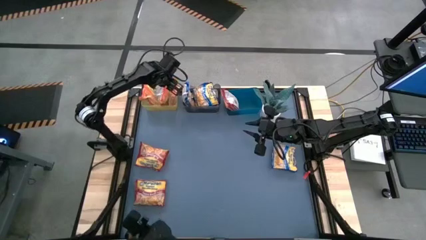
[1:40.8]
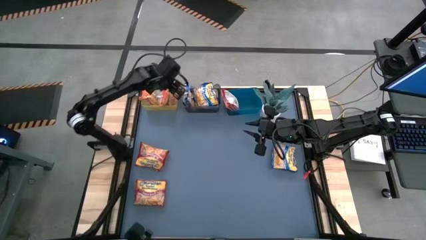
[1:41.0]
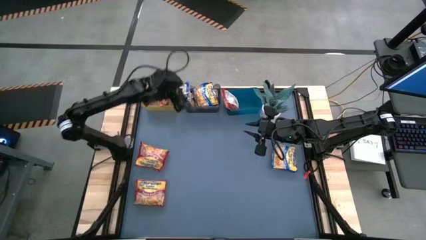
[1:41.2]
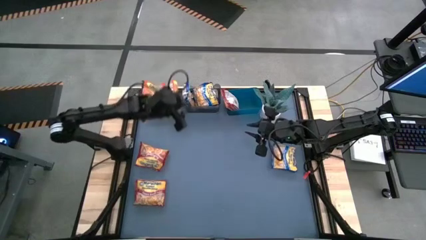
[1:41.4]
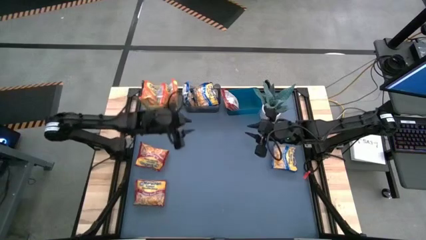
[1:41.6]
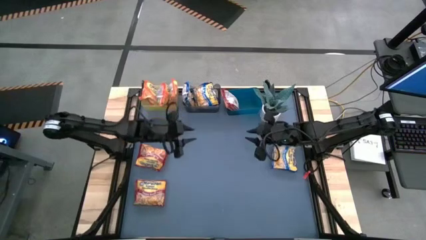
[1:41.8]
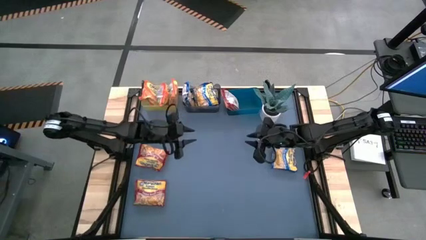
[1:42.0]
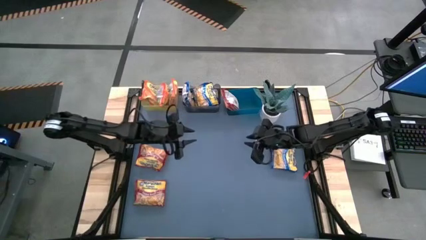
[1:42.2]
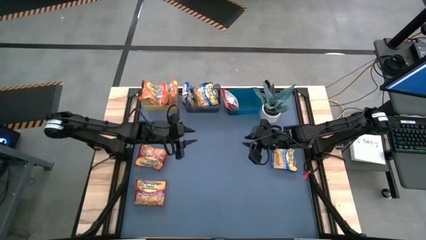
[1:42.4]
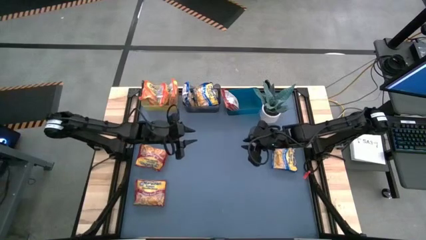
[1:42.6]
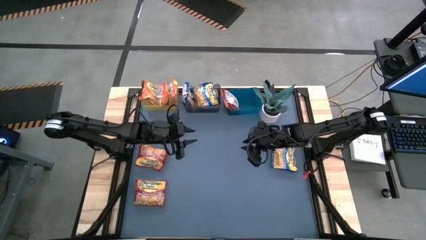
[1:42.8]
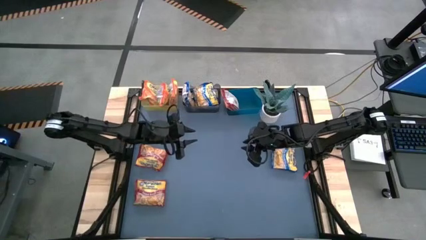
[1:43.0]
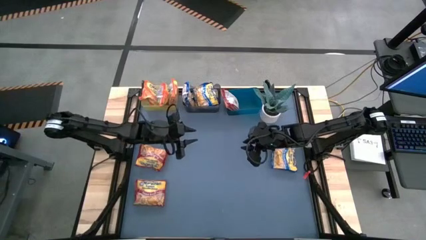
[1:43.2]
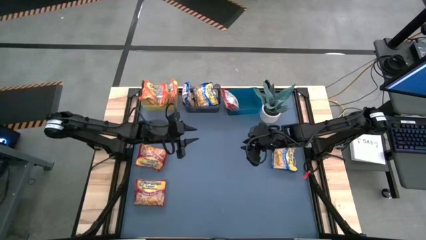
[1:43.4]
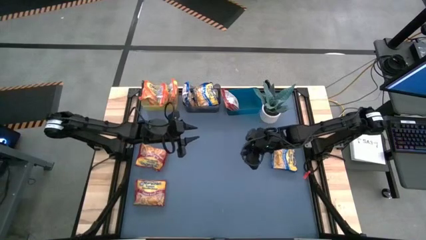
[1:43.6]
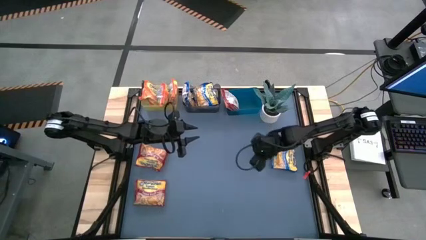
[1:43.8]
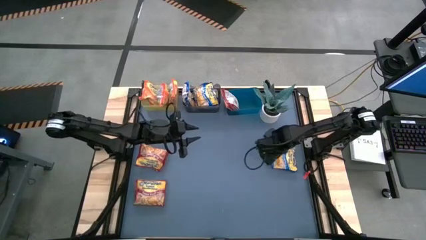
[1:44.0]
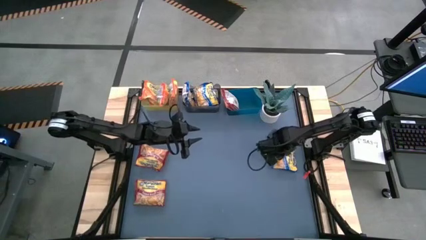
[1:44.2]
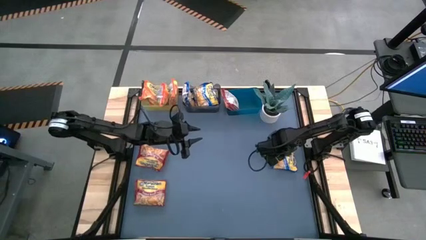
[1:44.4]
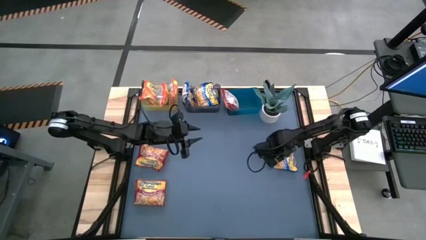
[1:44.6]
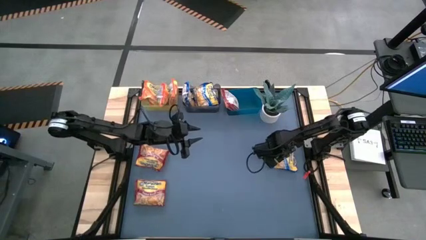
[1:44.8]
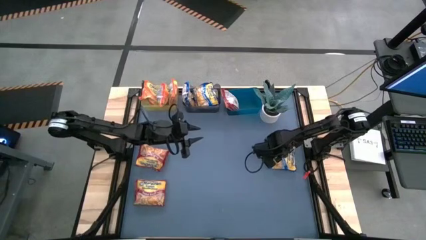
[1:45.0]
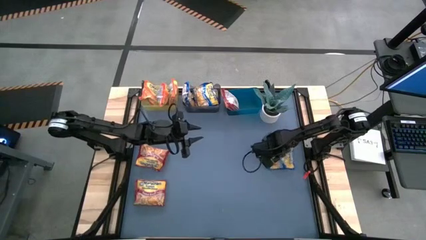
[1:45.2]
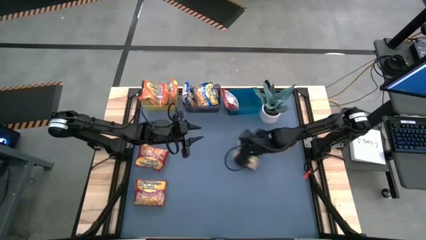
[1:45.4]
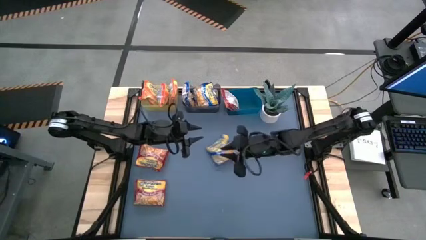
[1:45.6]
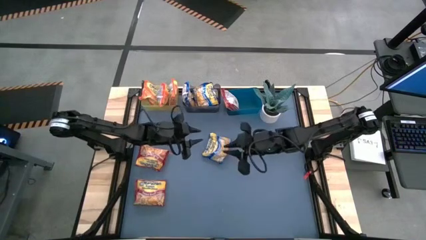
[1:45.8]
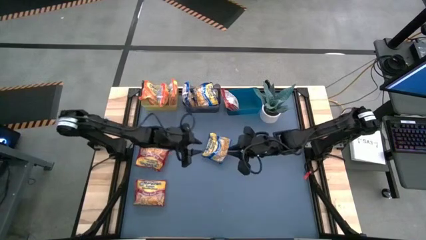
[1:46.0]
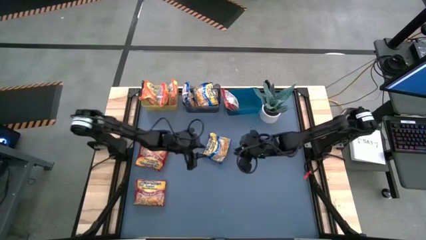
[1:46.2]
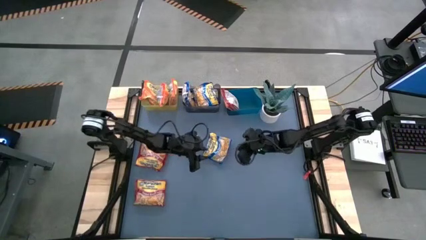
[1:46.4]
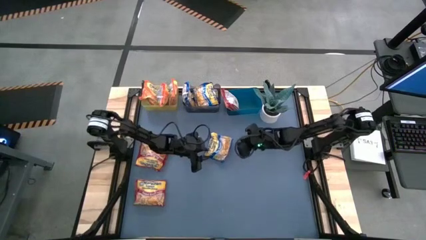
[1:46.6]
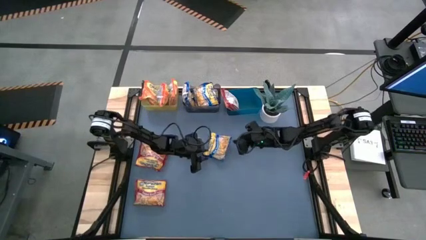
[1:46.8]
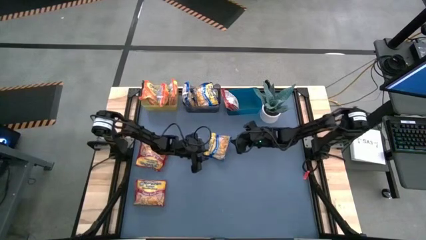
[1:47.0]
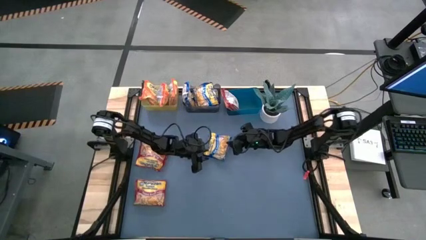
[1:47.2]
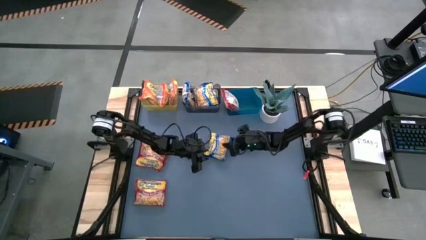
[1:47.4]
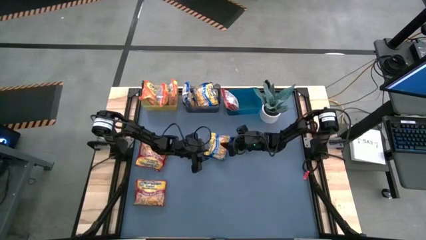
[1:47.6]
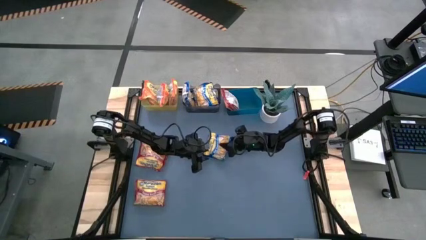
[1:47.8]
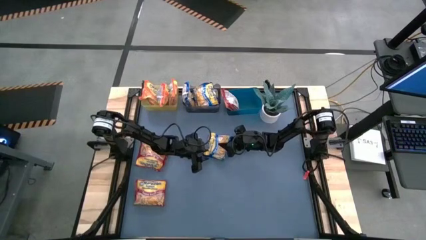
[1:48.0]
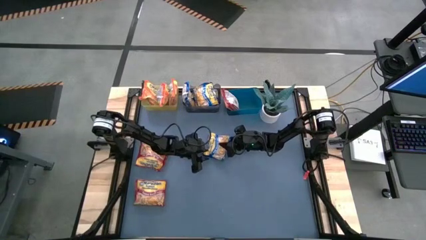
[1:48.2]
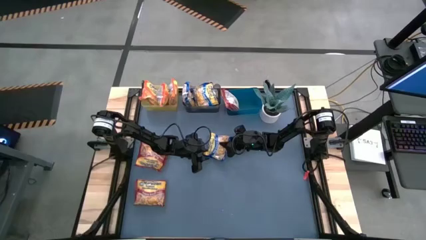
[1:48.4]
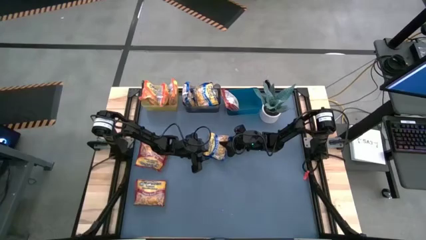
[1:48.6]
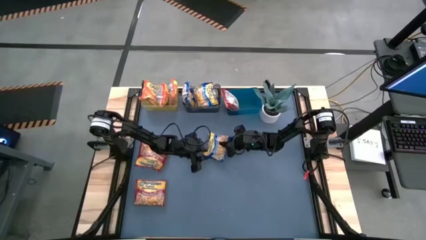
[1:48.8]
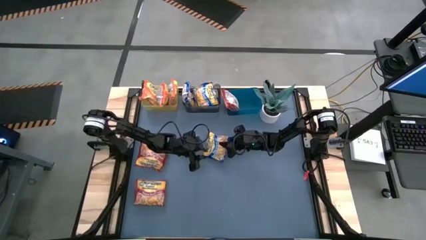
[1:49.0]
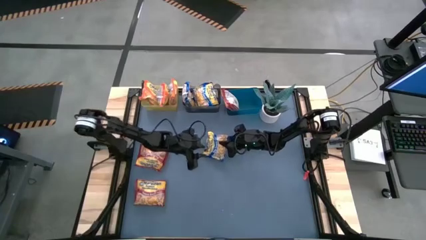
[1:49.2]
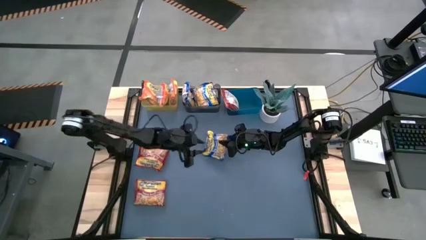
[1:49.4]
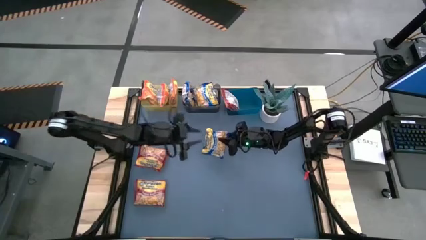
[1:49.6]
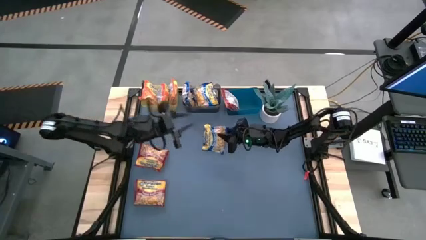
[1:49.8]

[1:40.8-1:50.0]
Task: Sort Maruchan noodles
Put the blue noodle pack into the black bin
